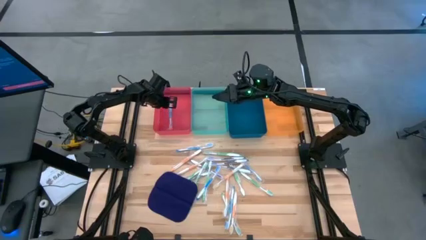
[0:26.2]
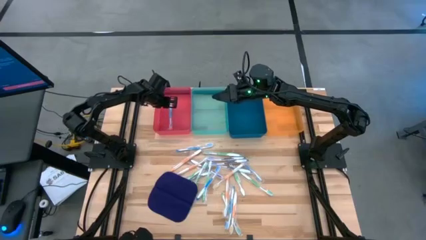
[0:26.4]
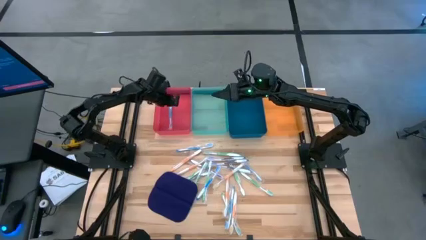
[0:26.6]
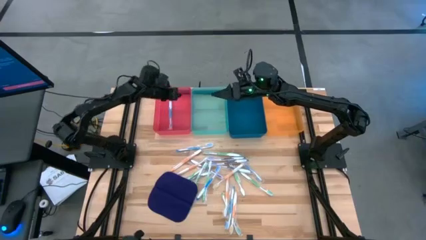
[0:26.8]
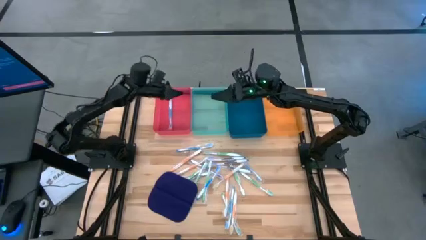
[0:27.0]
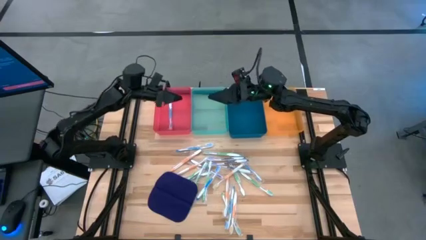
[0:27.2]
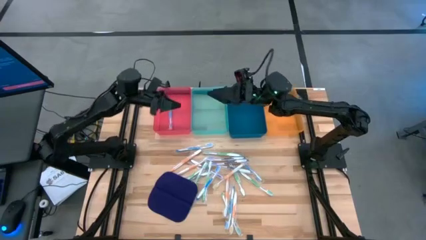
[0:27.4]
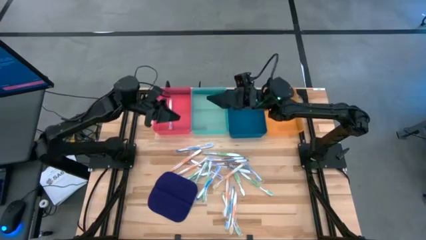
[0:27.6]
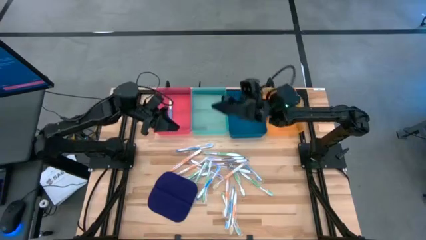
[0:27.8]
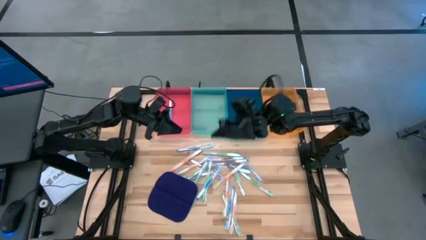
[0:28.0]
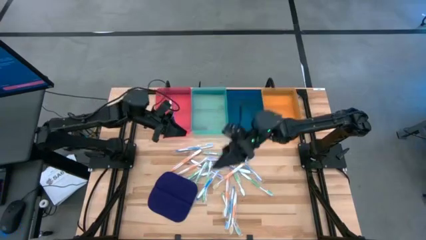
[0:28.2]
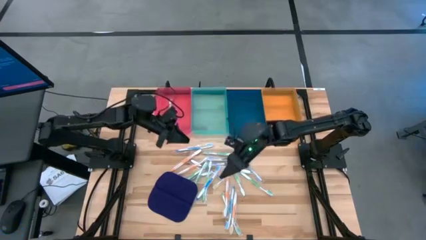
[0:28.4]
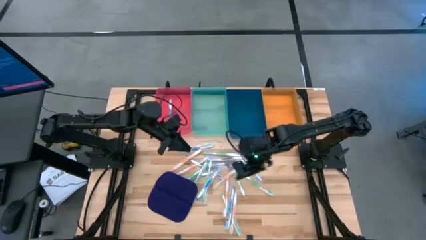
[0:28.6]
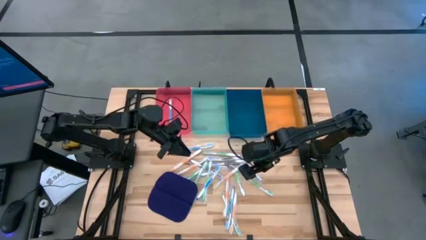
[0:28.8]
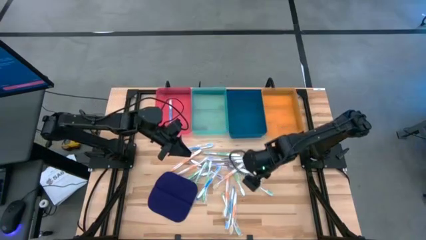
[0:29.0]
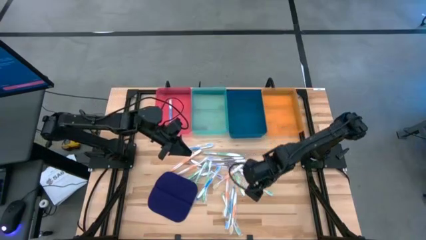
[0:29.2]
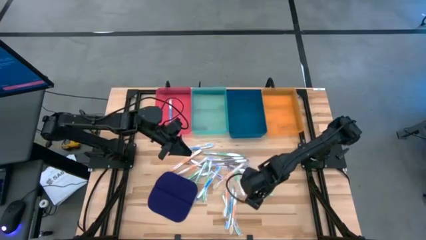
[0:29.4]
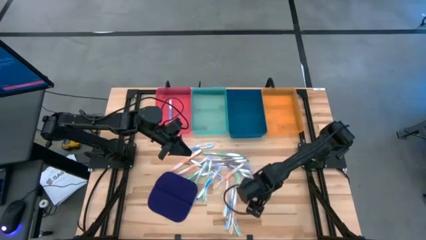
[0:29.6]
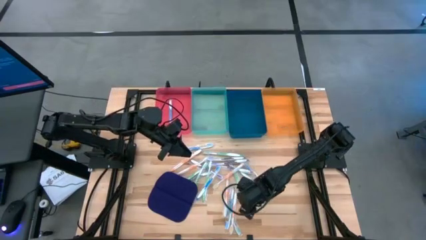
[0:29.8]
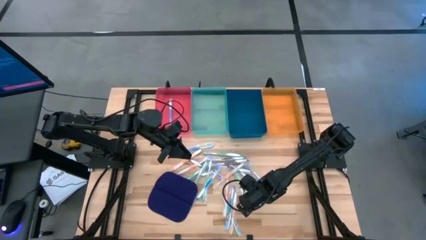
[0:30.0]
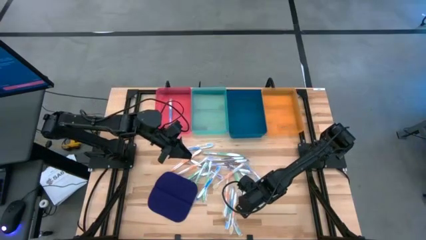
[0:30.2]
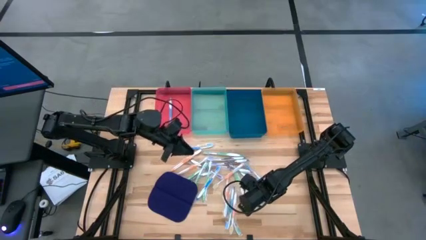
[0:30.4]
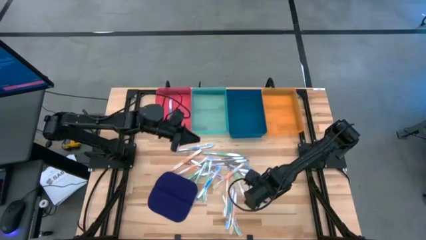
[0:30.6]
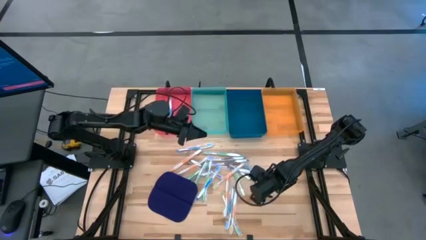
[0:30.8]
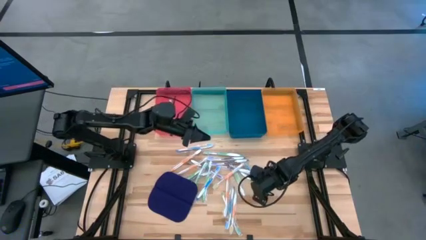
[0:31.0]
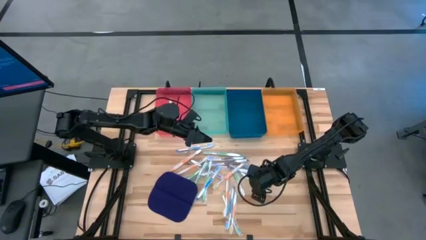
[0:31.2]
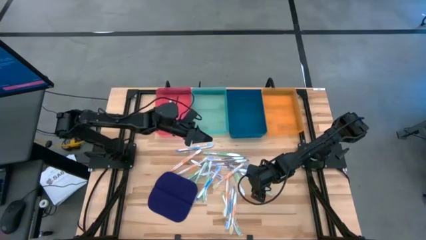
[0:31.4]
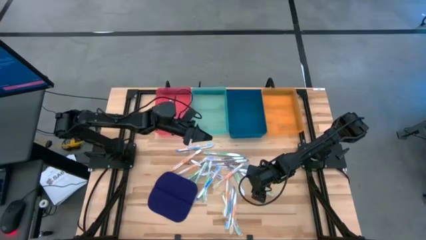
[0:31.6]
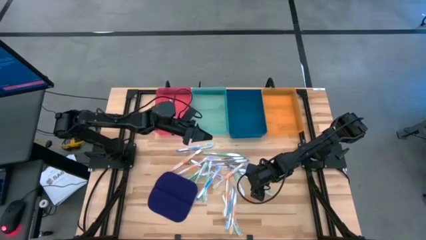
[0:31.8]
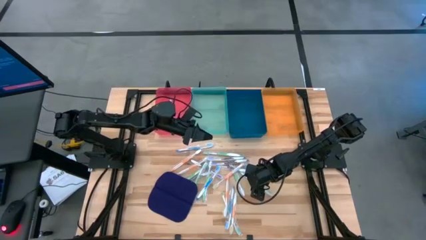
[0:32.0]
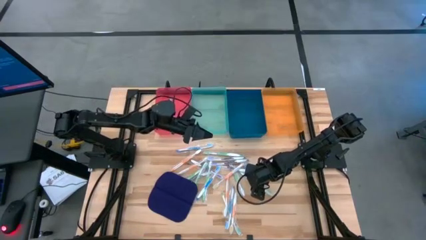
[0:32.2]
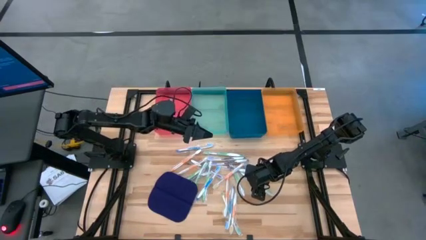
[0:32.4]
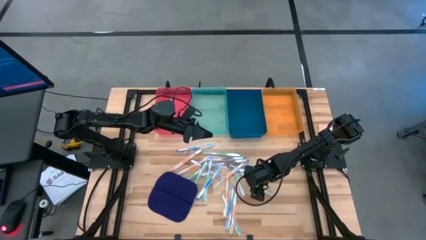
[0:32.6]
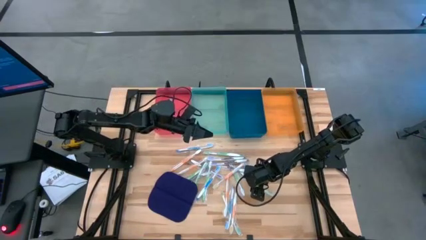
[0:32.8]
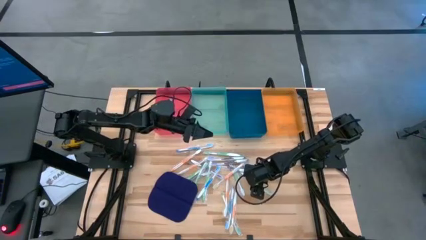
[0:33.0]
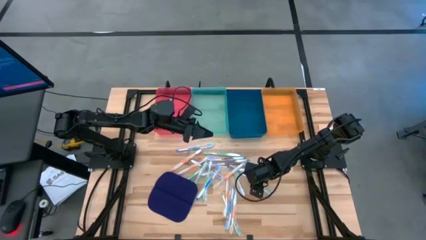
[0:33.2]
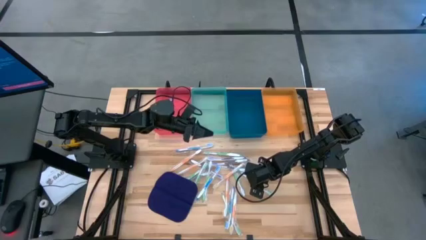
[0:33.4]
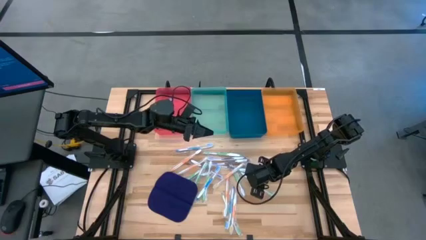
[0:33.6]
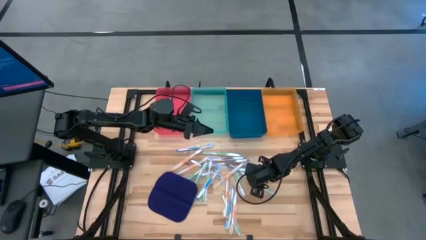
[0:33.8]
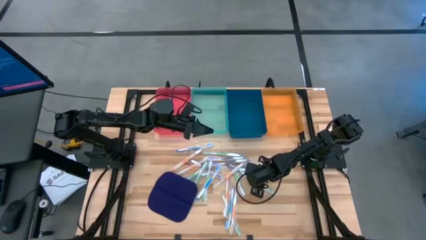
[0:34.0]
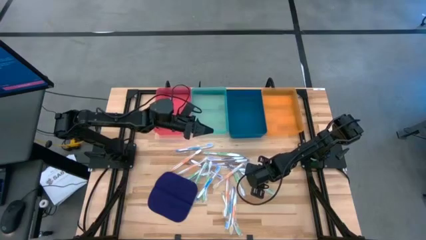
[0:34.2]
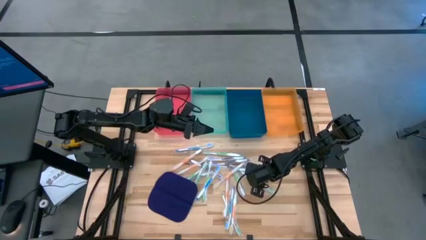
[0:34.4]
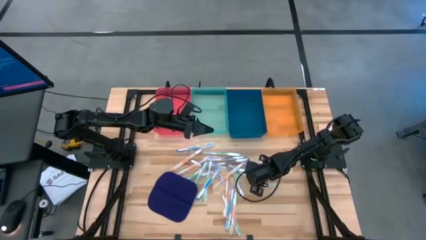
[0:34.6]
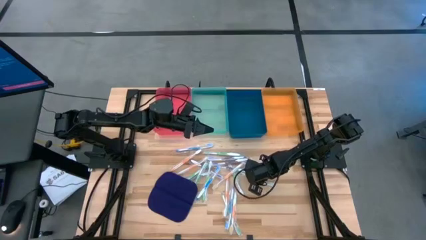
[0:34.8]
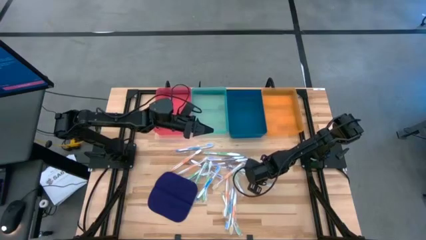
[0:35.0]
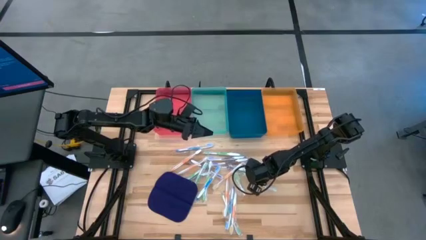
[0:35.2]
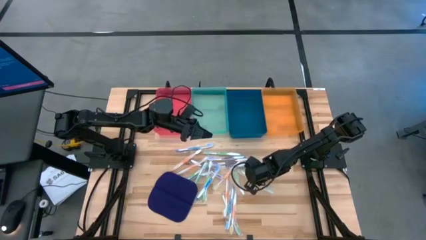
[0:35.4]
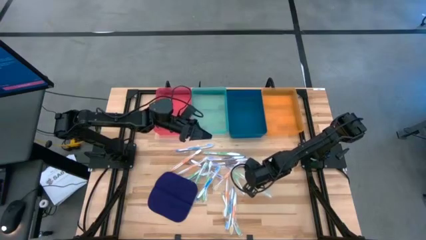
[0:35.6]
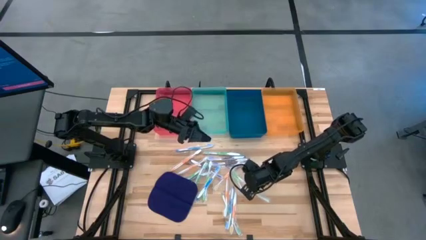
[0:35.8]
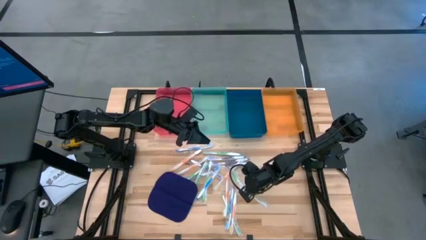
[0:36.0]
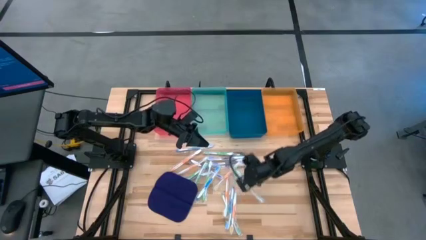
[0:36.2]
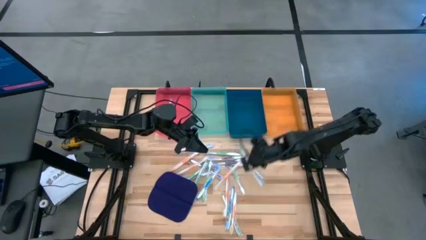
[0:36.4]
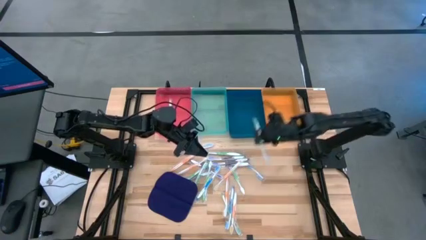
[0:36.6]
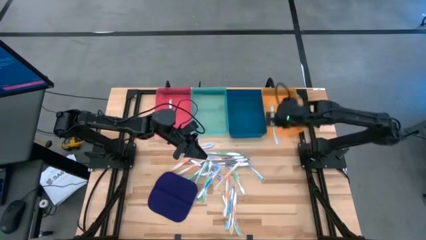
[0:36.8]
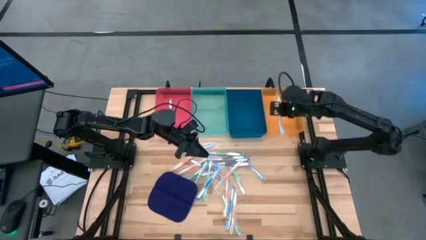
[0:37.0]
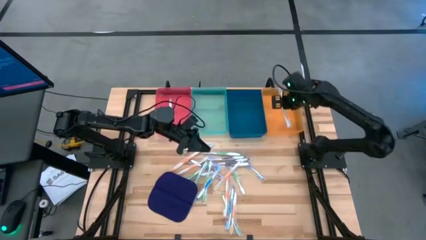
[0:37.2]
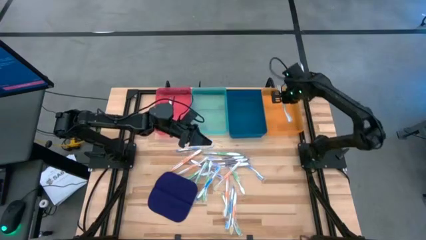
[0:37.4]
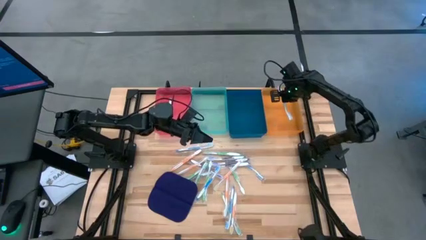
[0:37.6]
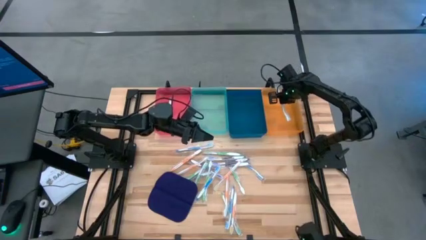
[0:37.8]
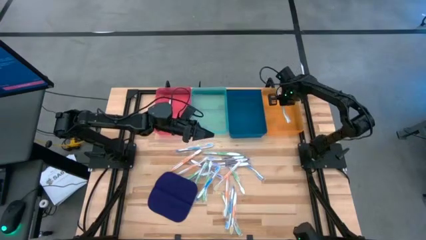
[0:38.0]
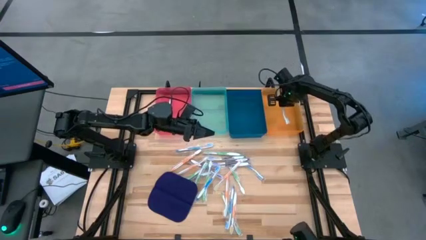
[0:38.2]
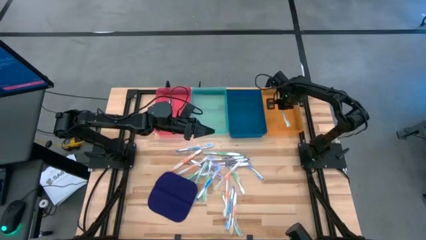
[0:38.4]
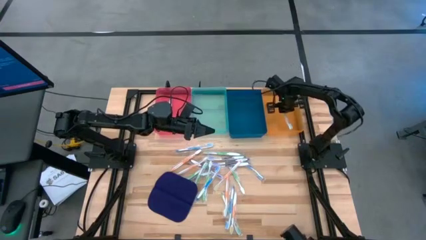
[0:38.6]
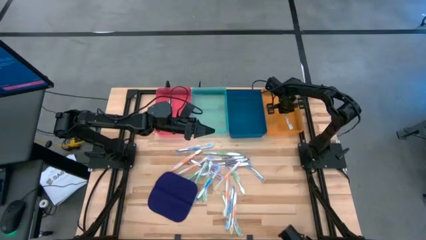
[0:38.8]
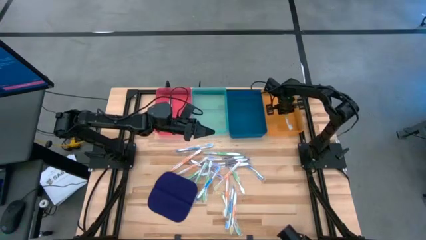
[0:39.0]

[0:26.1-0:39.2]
Task: Pick & Place Toothbrushes
Put the green toothbrush into the orange bin
